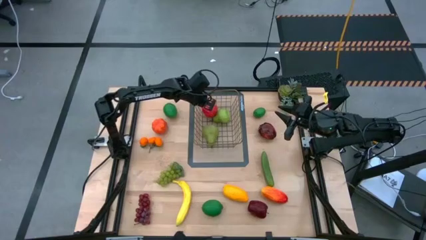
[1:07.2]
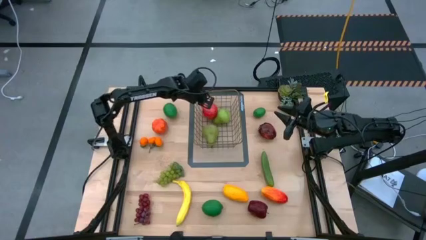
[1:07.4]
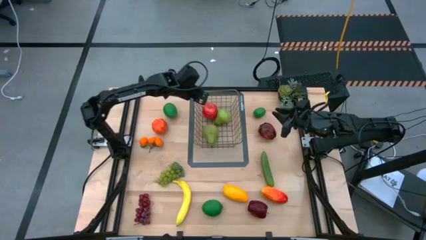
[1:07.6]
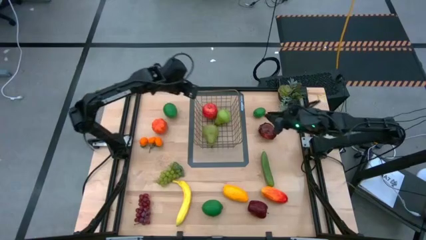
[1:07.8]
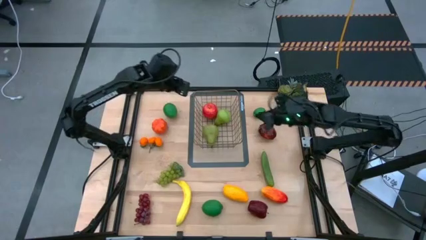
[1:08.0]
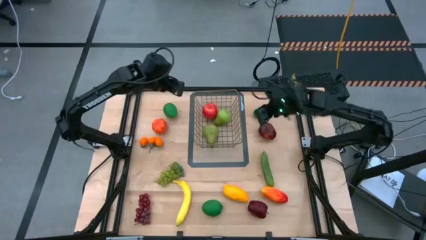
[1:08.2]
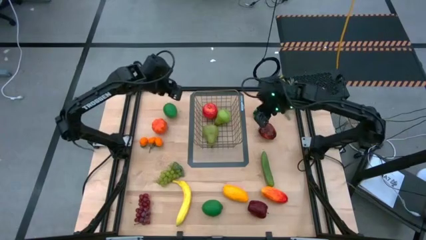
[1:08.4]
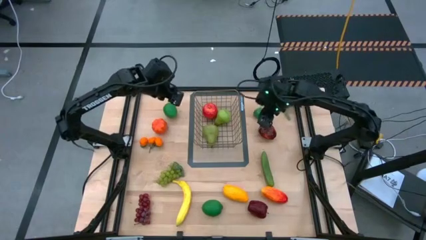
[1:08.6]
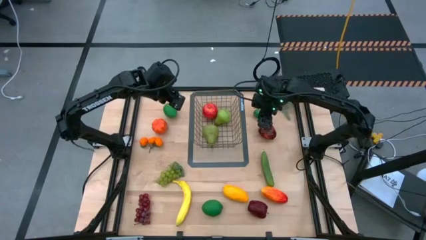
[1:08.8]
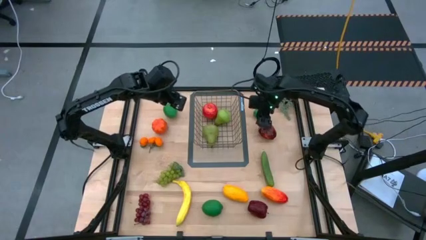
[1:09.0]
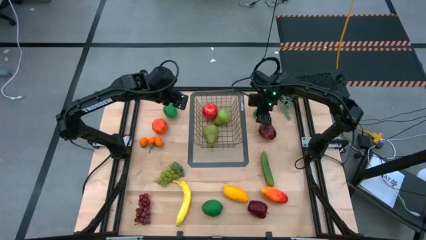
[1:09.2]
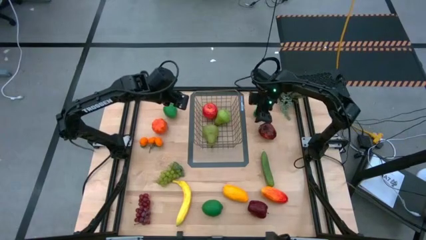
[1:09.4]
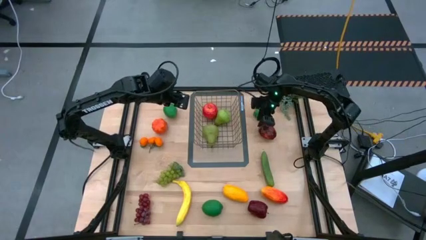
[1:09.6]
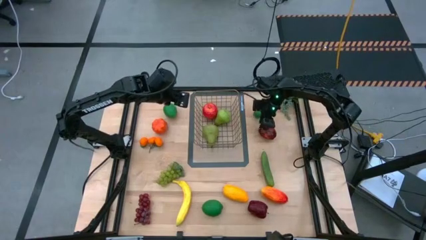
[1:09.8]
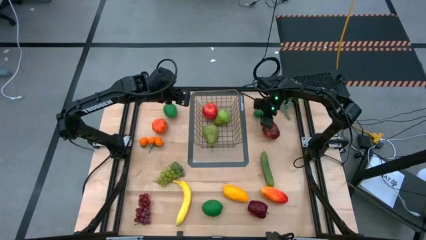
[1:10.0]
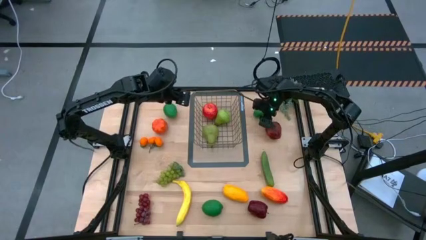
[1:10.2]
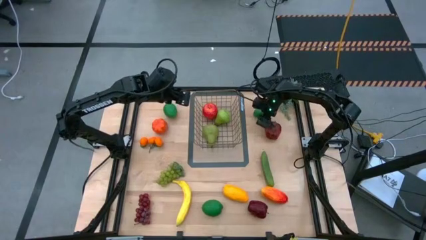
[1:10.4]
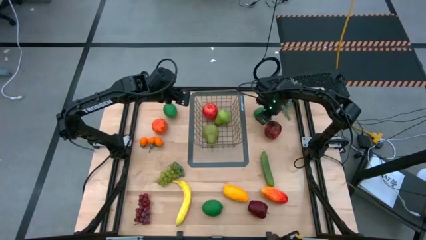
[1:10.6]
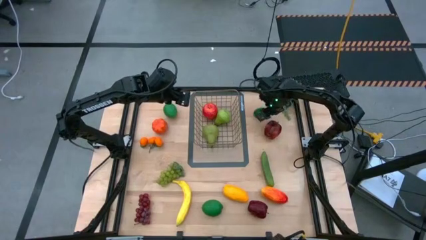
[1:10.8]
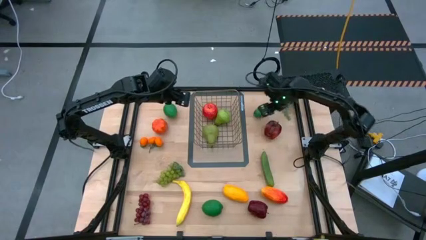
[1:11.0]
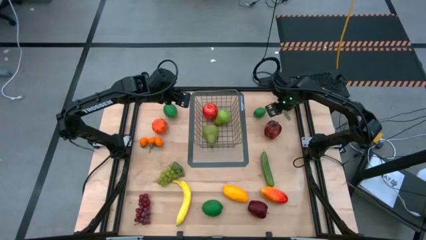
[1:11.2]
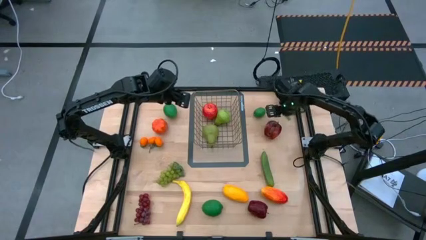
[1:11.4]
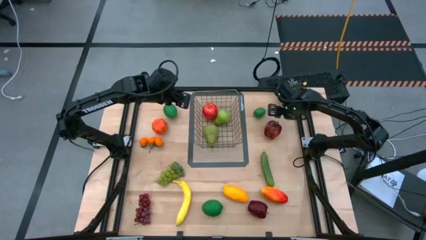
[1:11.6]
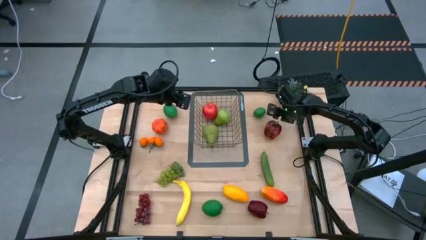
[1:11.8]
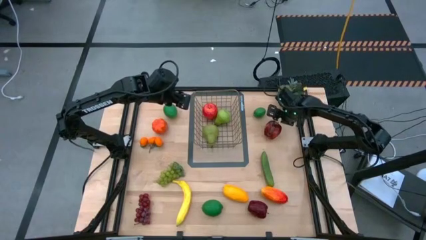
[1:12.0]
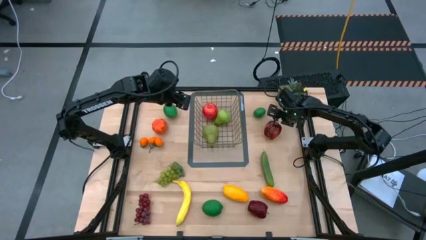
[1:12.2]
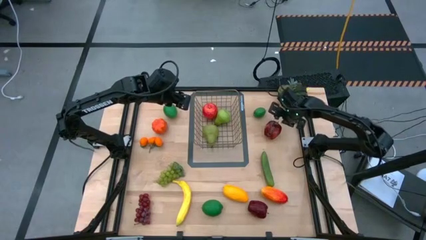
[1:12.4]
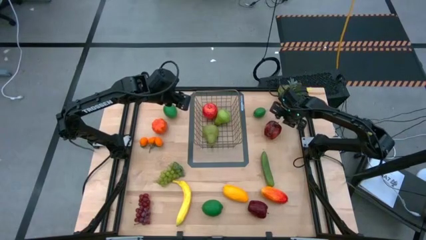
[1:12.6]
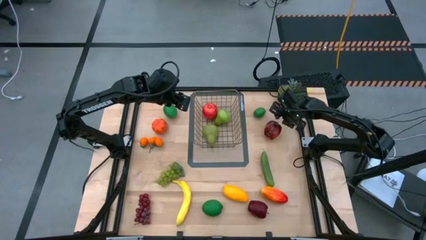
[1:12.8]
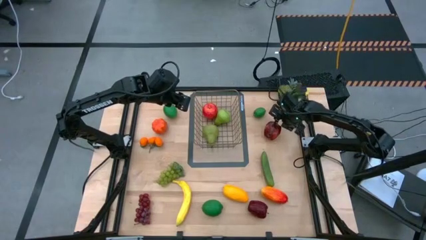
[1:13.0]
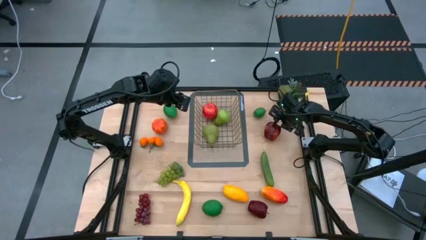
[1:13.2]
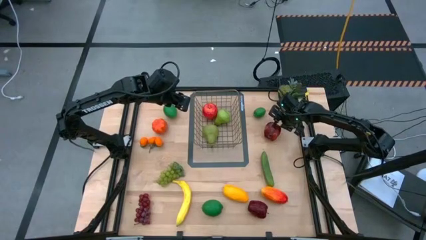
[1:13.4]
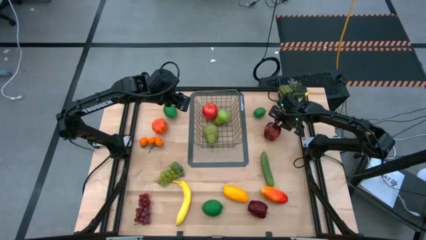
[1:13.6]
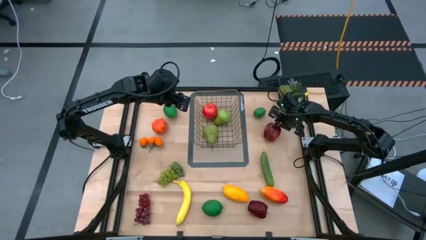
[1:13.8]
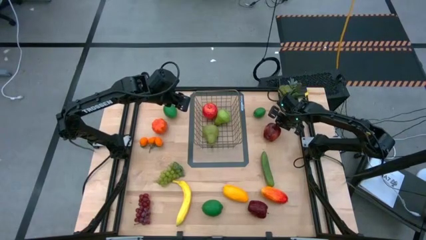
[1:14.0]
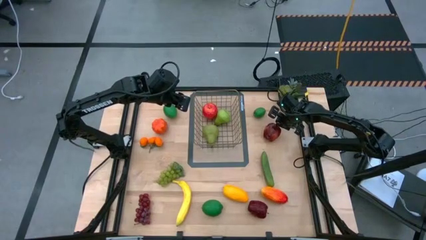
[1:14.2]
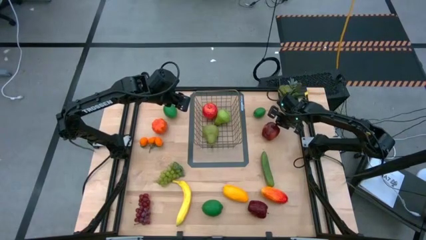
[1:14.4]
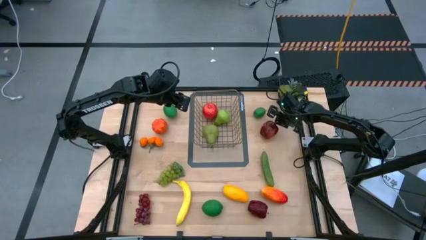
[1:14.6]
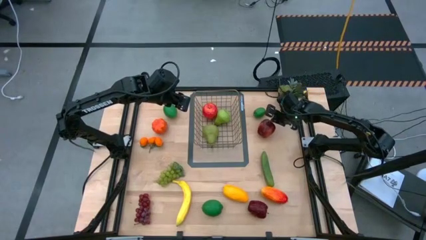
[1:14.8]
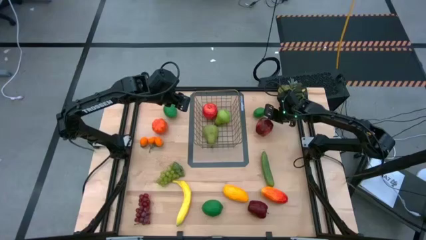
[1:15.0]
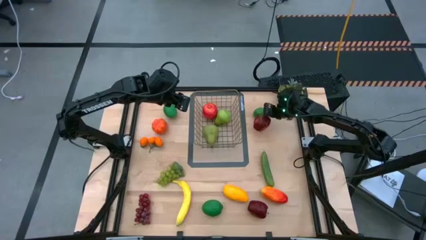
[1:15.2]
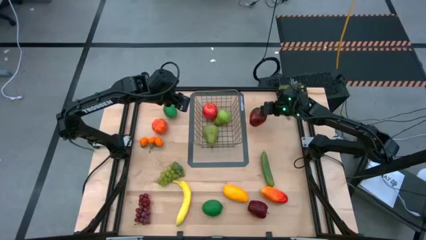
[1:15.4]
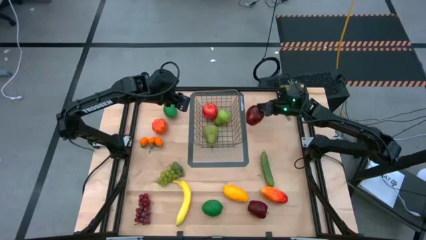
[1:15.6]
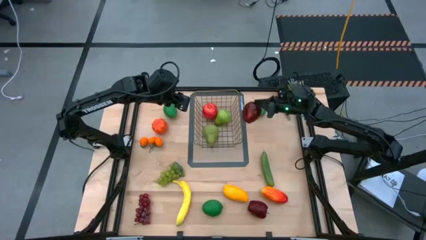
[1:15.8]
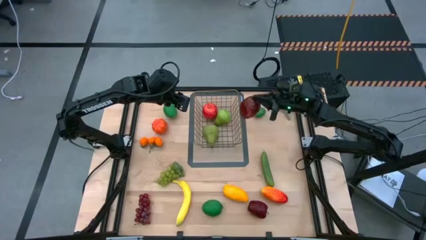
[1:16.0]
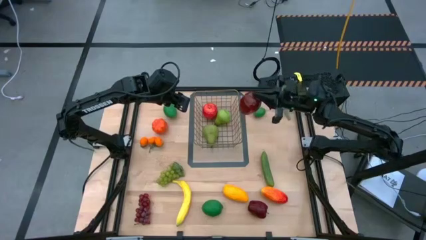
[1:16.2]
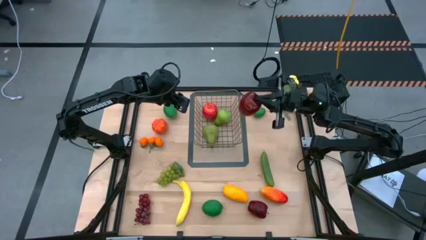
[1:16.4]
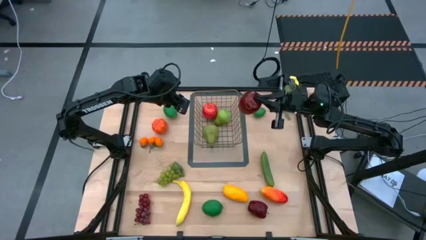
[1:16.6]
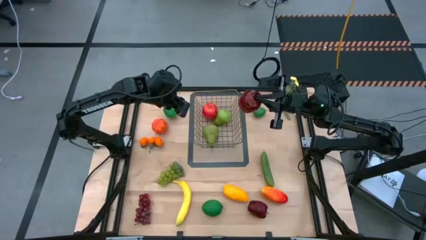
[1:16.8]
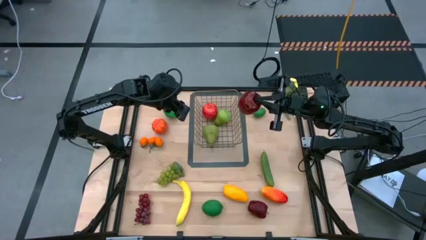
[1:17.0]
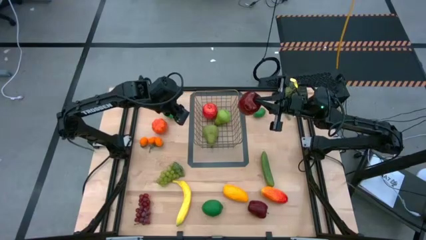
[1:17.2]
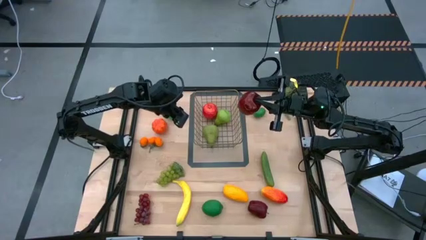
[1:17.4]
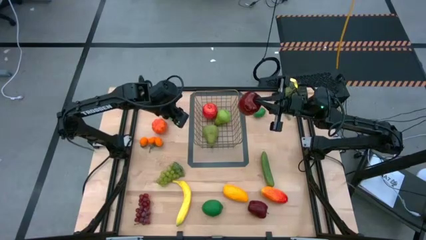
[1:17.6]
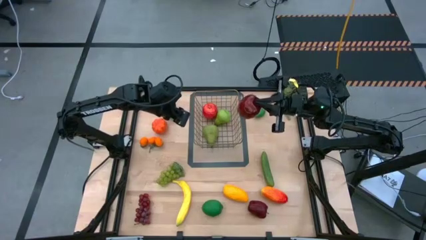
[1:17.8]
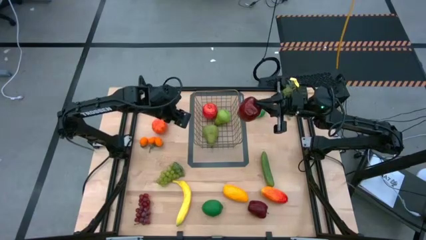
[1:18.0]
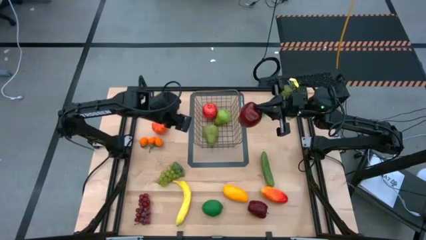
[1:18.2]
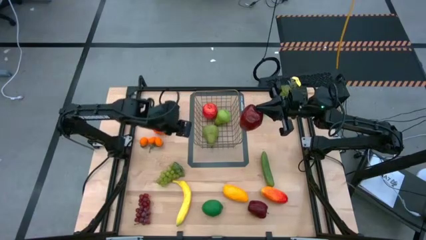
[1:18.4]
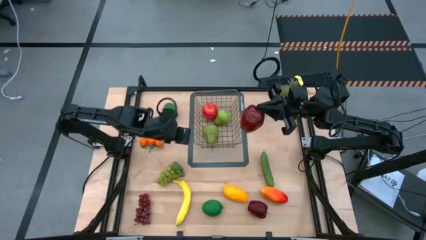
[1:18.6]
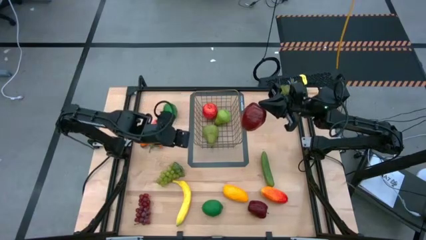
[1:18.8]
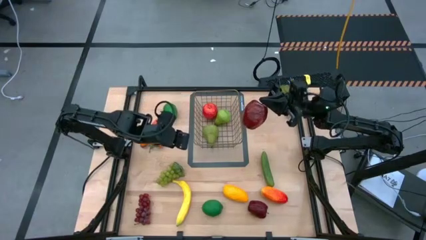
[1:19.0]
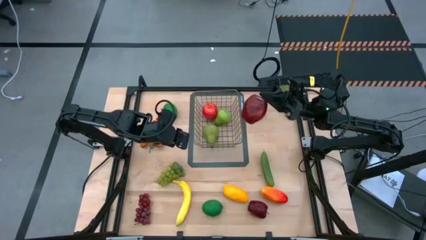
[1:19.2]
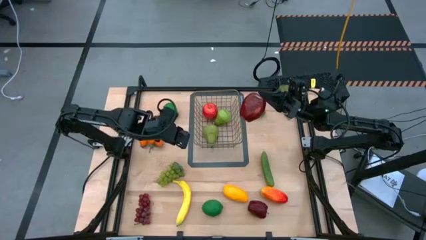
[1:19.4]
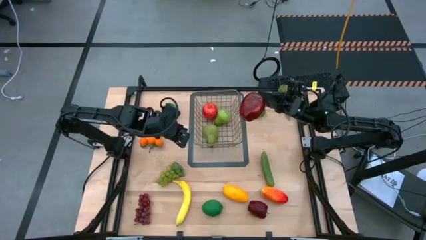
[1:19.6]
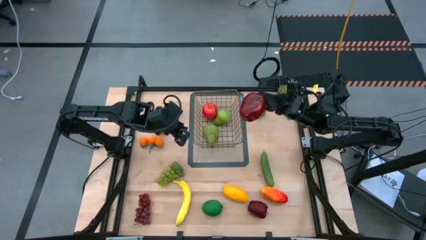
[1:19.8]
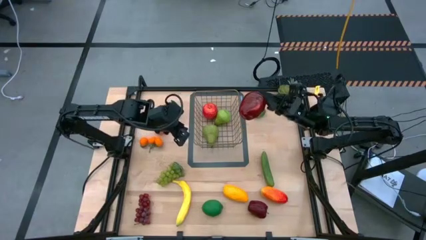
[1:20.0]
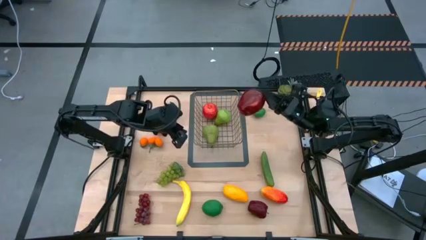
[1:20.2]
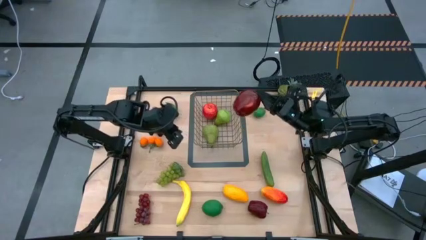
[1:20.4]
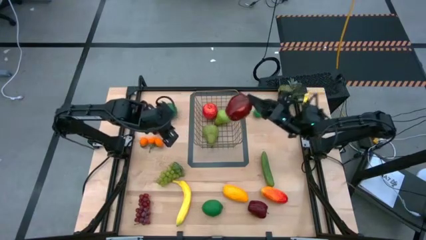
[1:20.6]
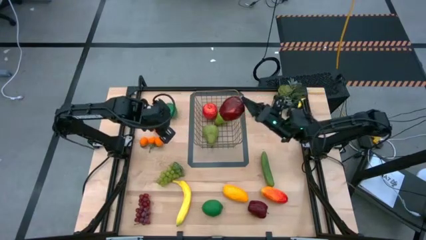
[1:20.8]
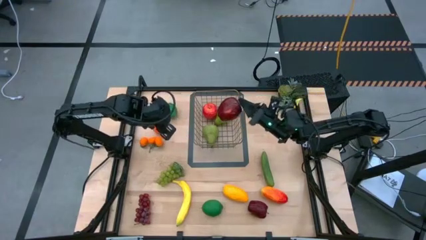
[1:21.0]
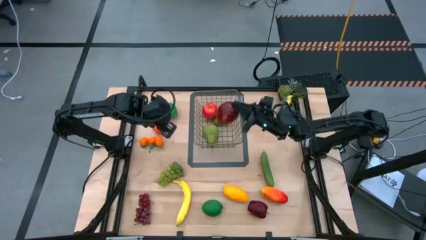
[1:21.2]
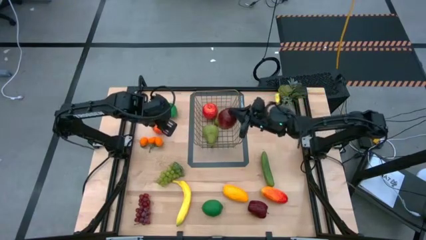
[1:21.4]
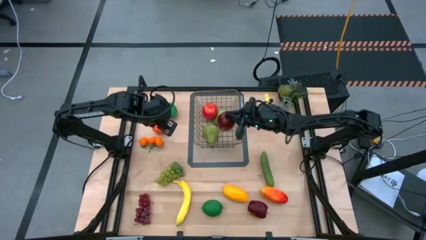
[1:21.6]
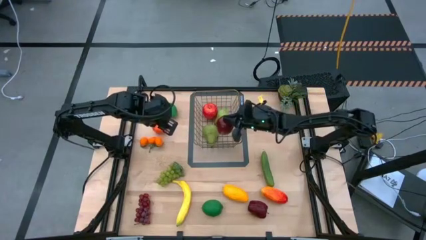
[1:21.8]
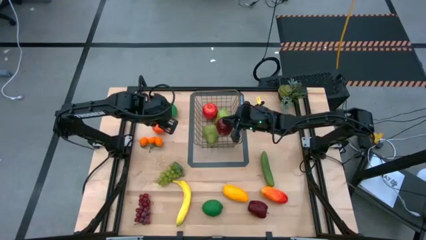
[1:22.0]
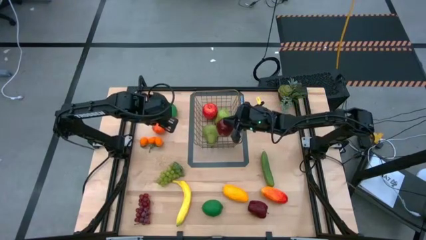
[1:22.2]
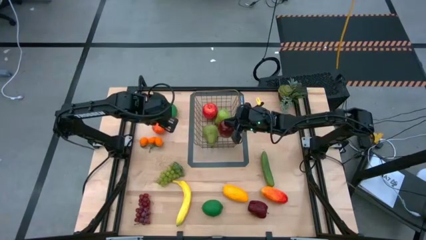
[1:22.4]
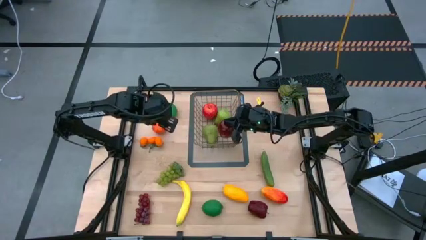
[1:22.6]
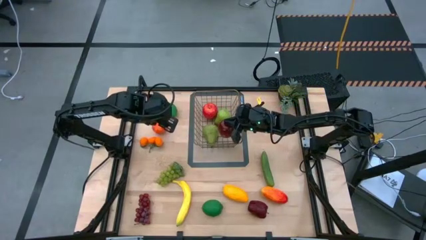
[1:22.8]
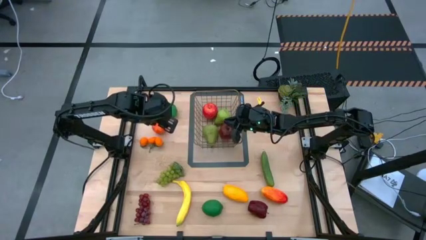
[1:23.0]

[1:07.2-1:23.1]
Task: Build produce basket
Put the top dark red apple into the gold wire basket
